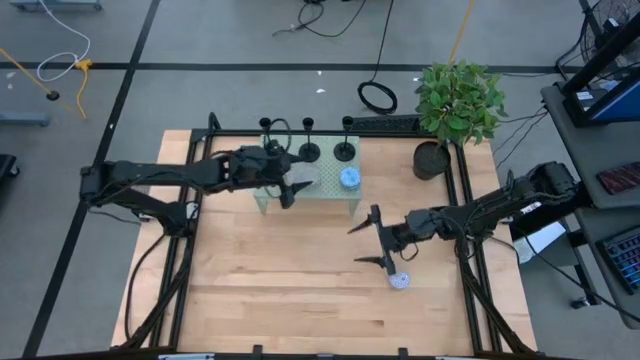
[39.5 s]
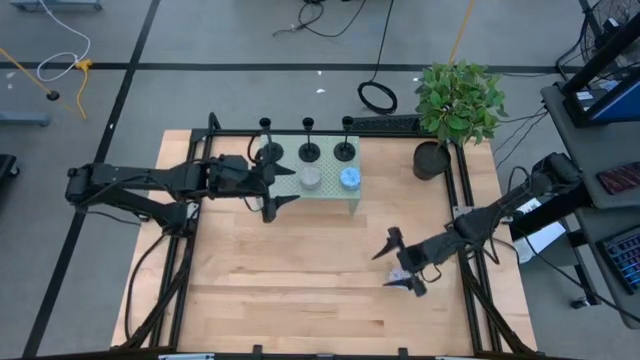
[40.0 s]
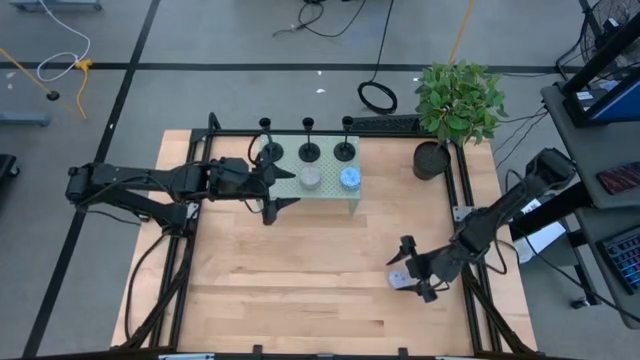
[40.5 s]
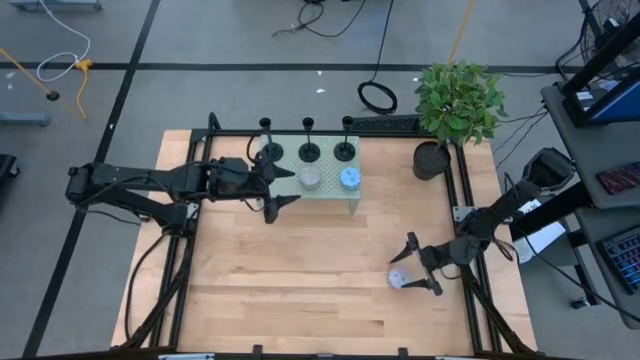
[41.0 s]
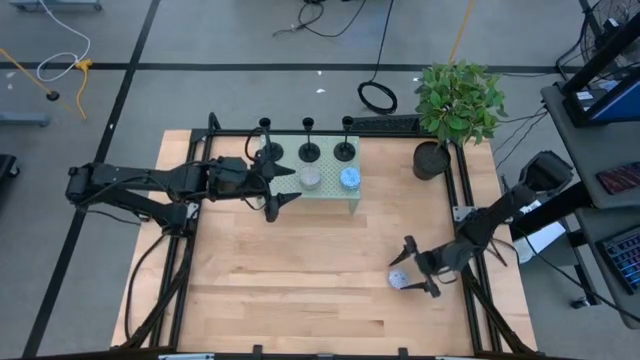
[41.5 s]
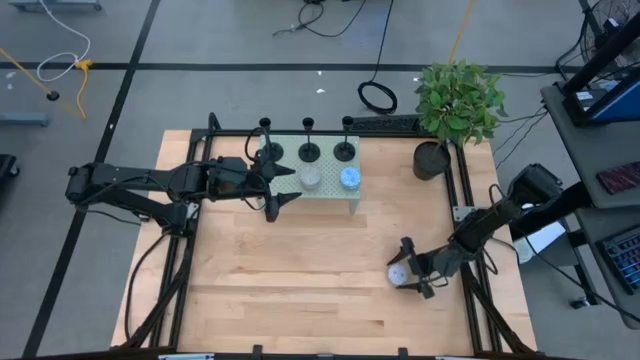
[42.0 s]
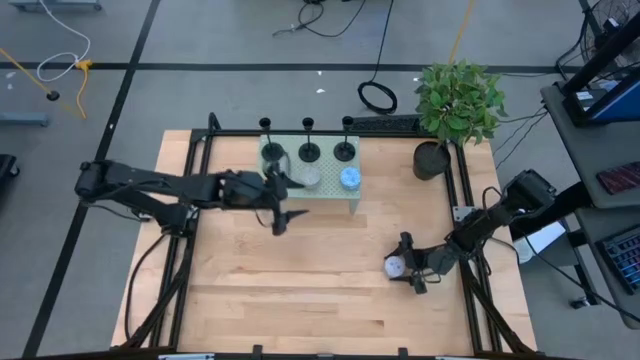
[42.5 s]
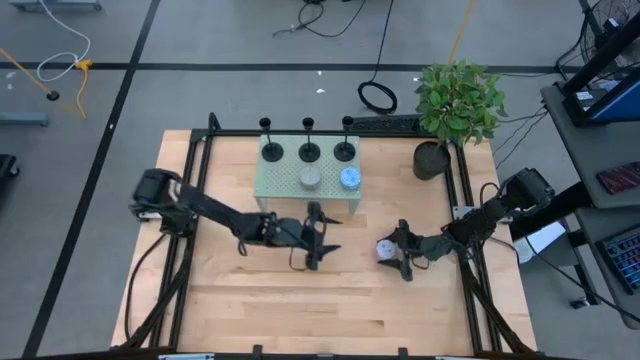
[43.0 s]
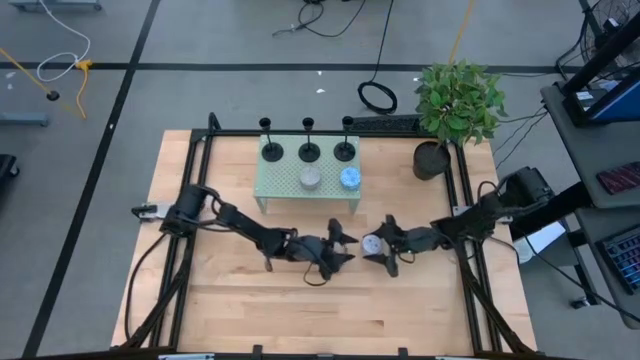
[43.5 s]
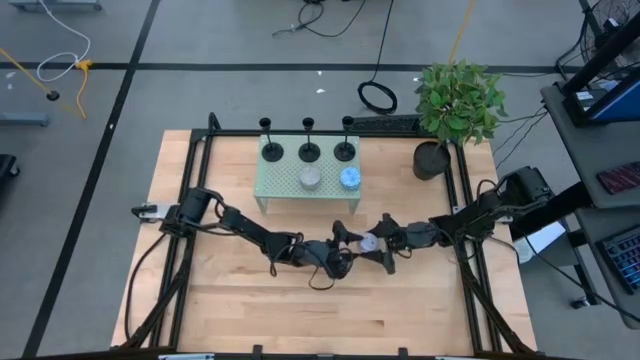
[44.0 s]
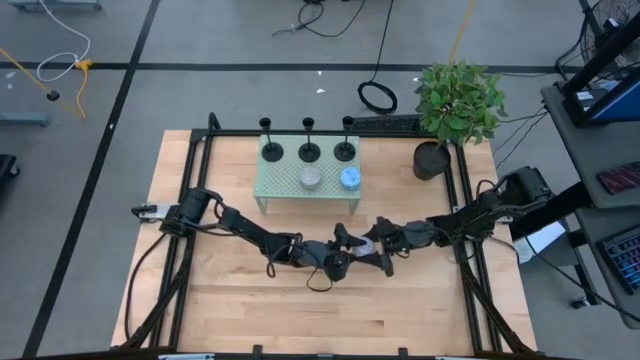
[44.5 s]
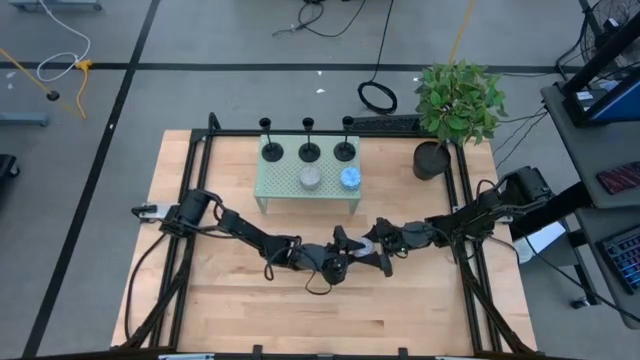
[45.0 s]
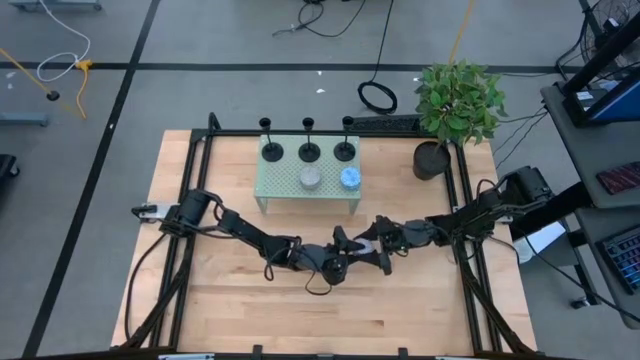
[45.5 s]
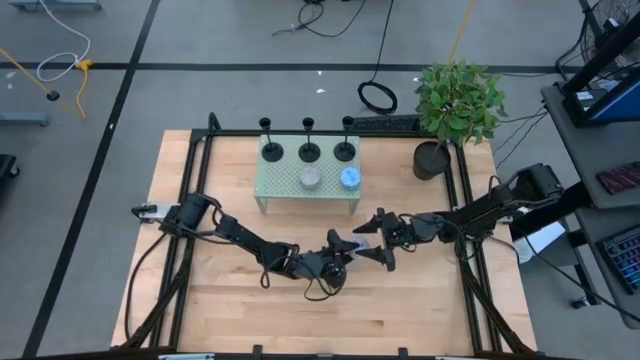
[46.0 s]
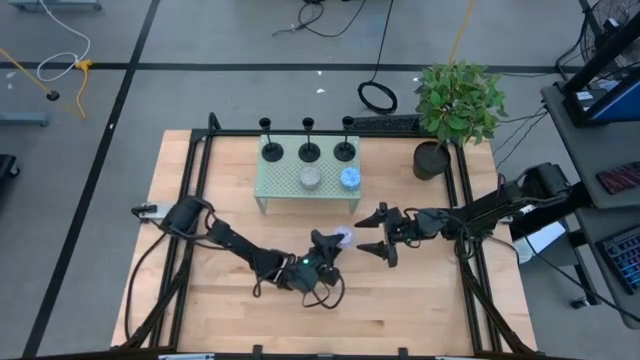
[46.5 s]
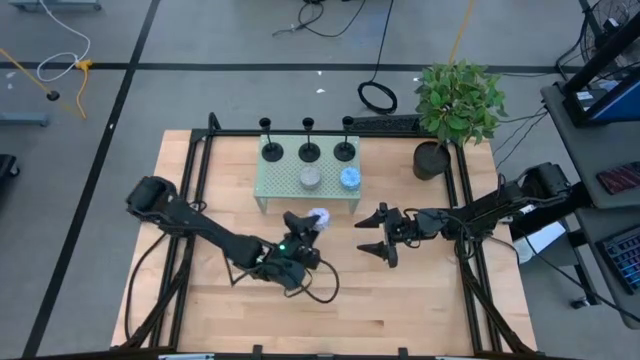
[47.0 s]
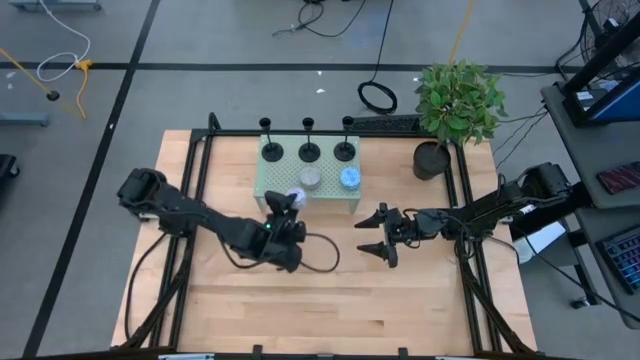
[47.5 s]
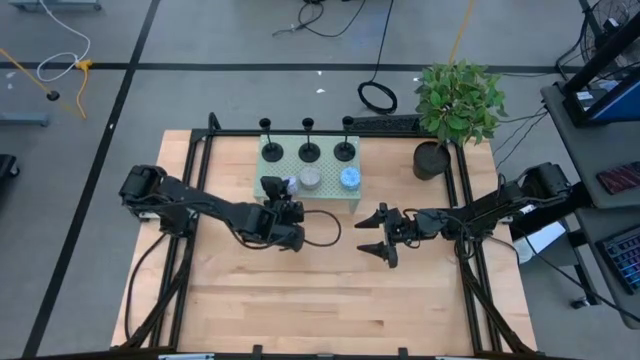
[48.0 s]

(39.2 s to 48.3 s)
Task: Pick & Place candle stick holders
Put the white red scented candle on the shelf aligned with the blue orange scented candle

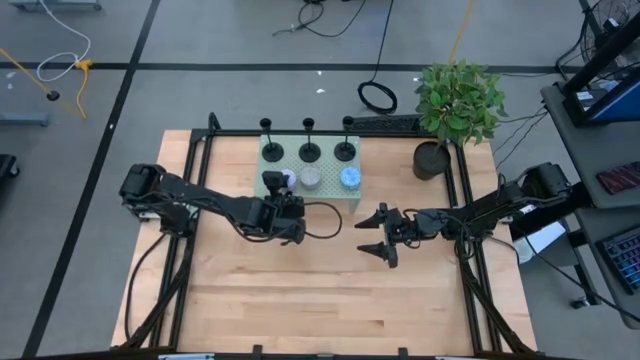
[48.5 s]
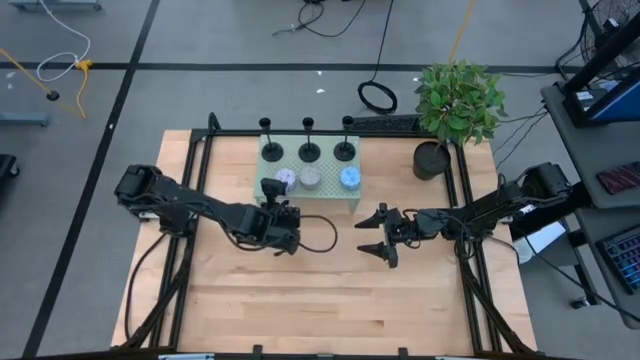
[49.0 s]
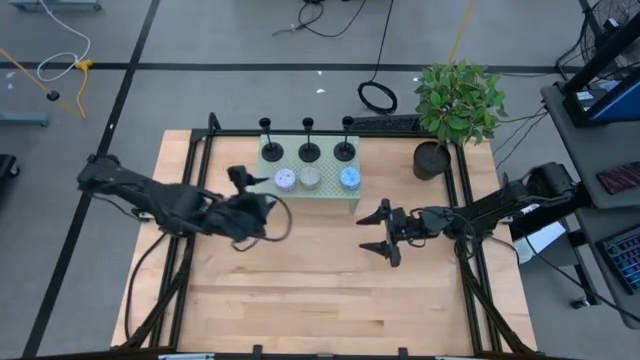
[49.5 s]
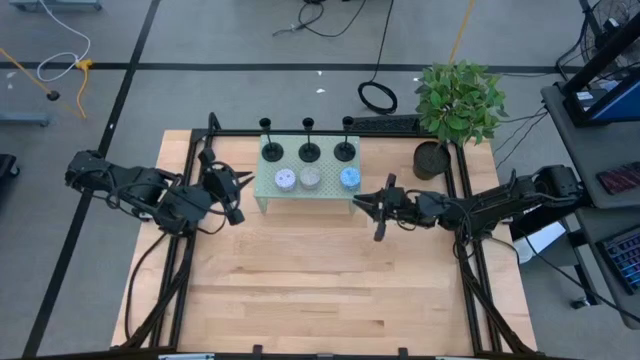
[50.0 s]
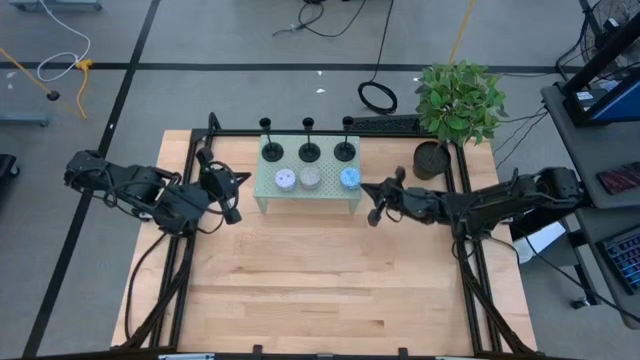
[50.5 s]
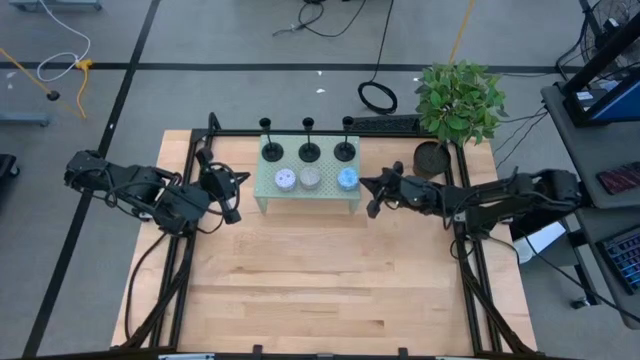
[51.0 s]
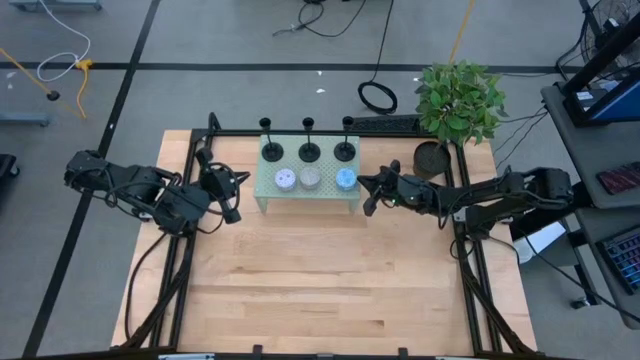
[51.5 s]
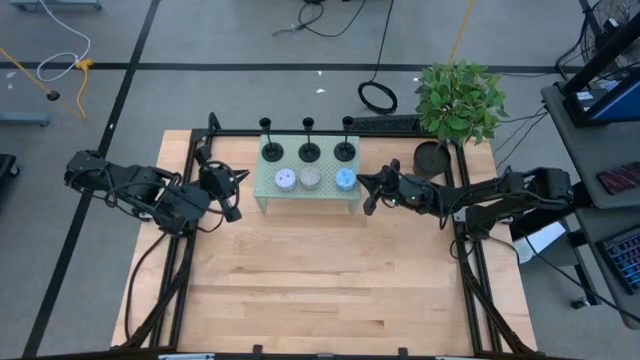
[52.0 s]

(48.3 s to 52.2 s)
Adjust the blue white scented candle on the shelf

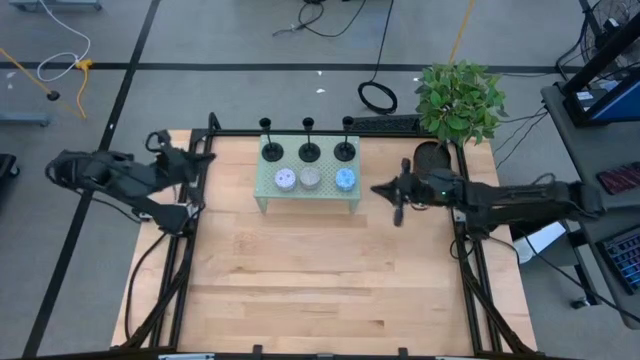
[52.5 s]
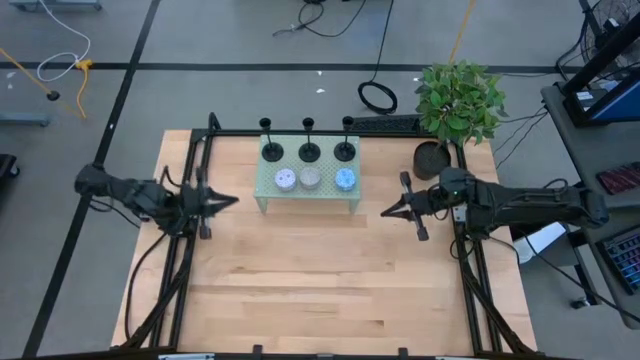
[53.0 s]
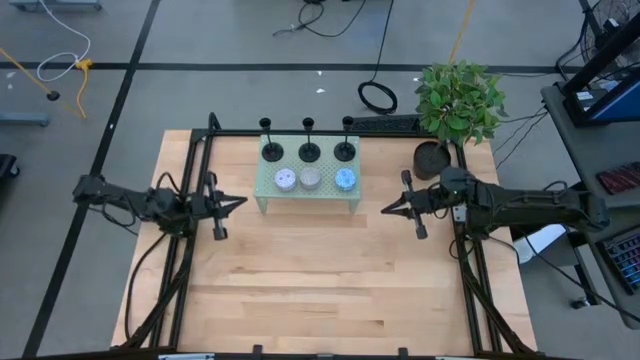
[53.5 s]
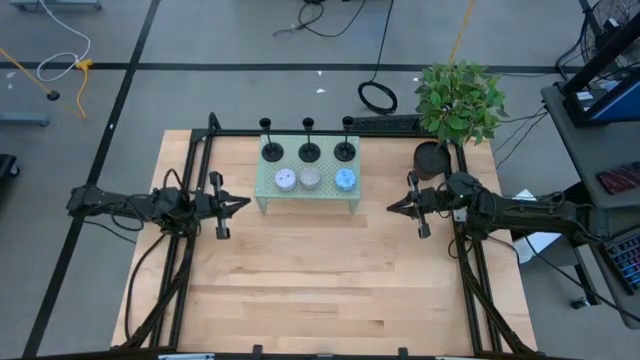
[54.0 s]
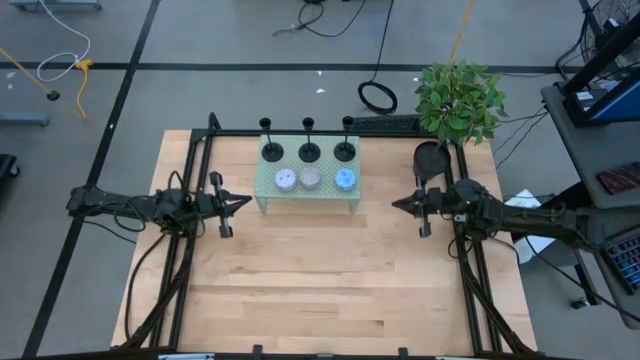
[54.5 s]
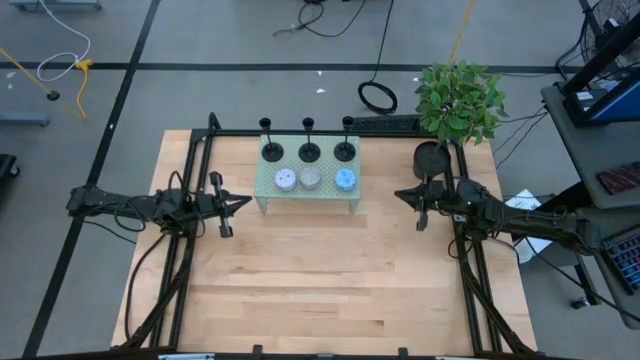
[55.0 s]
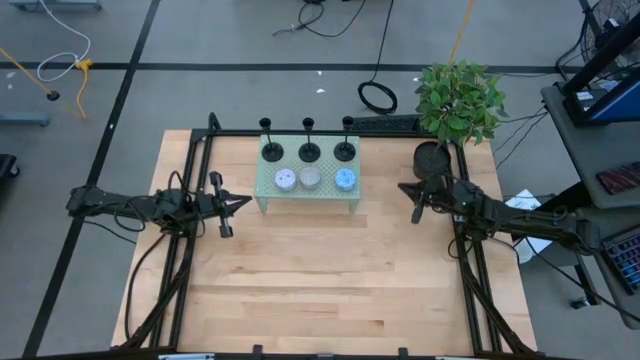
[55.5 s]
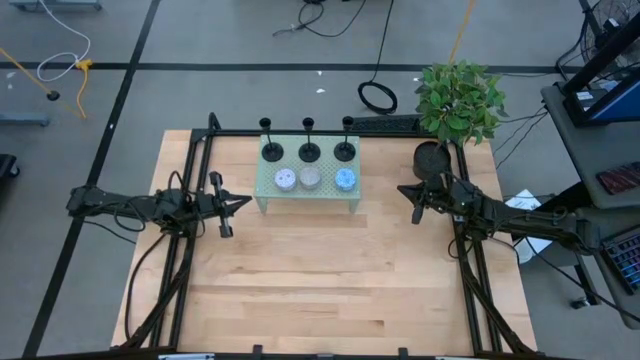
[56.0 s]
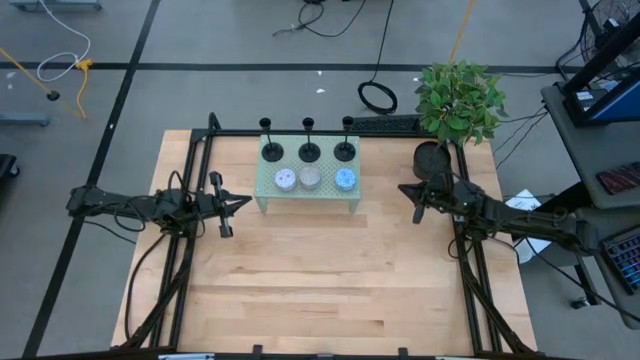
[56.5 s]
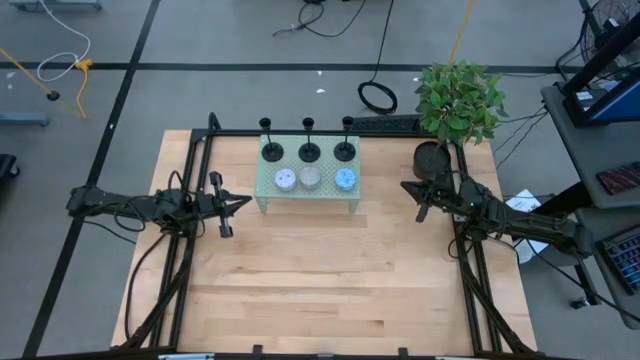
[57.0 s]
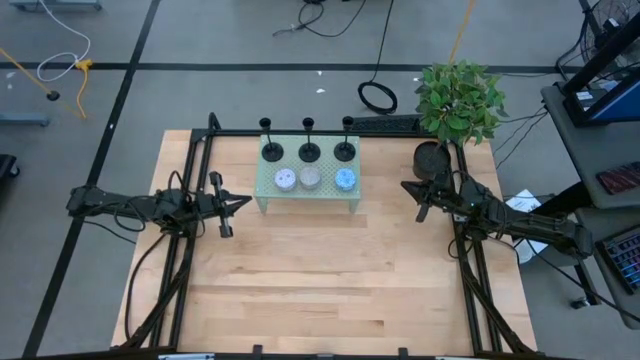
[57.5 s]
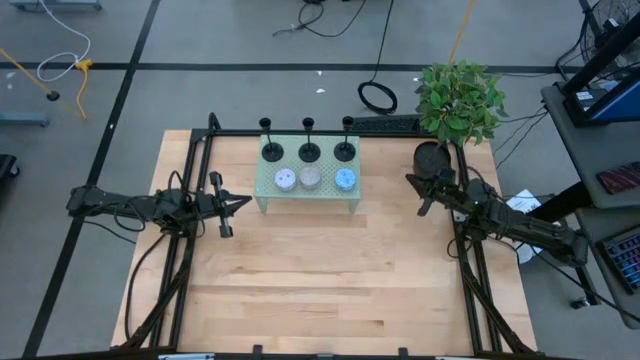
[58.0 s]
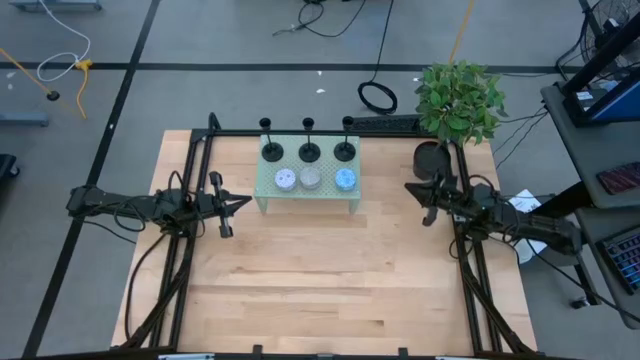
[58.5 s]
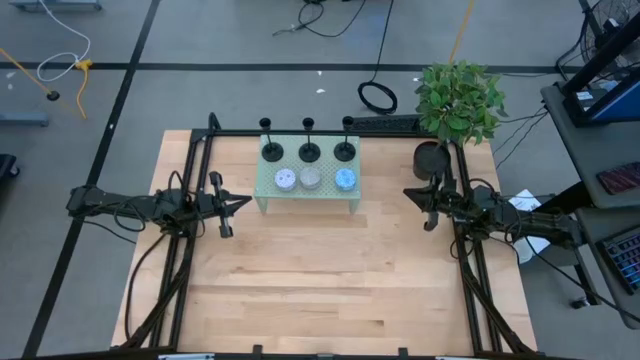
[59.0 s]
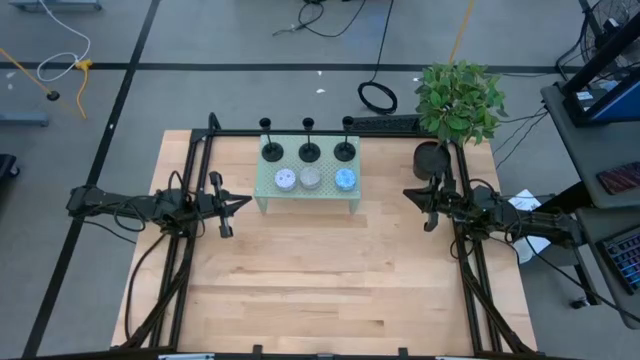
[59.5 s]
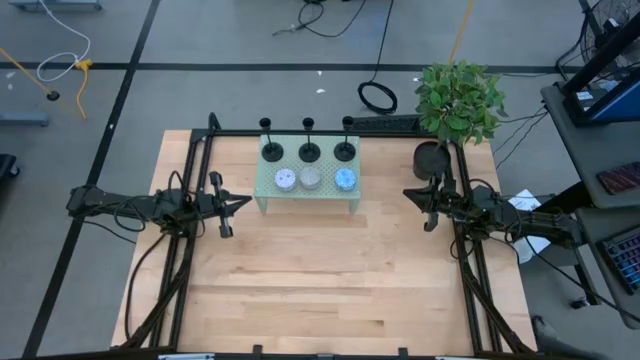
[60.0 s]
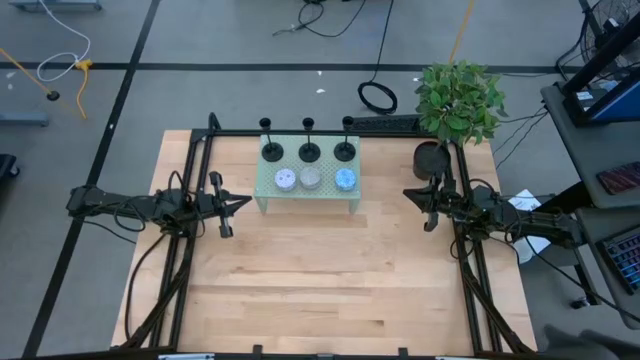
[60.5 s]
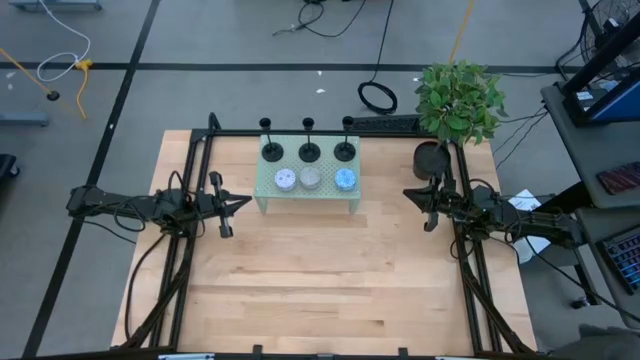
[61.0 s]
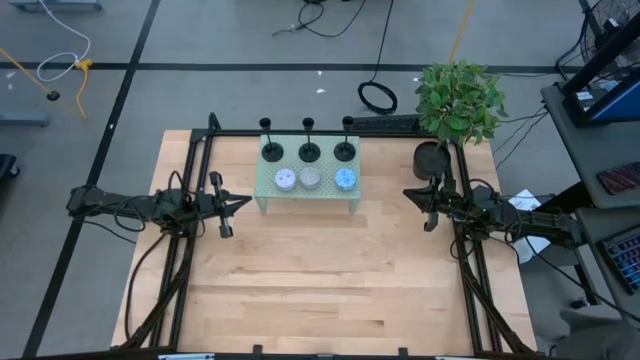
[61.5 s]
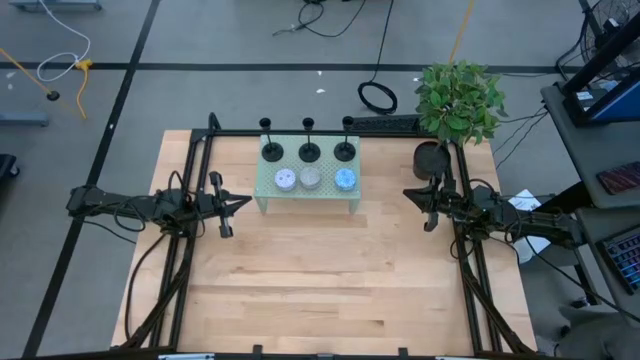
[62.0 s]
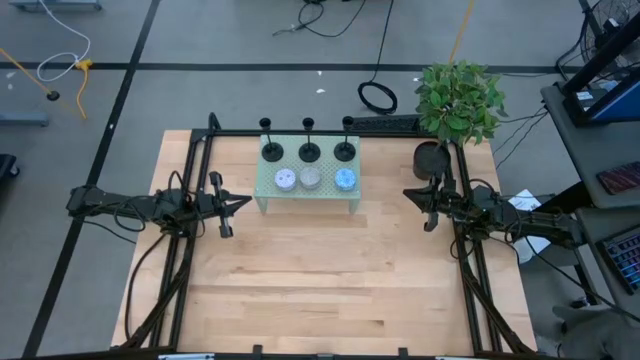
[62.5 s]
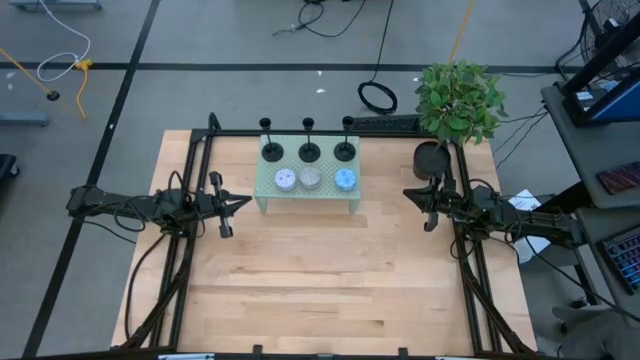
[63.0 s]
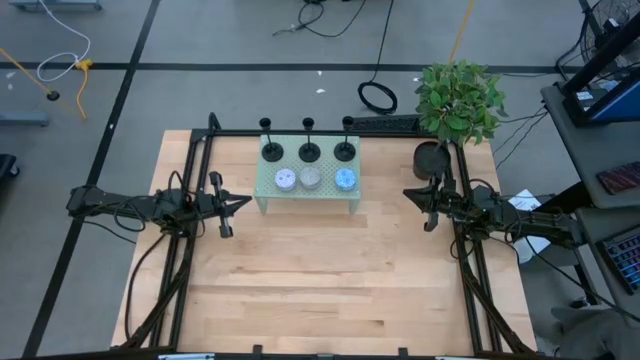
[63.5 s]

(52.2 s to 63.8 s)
Return to Home Position
